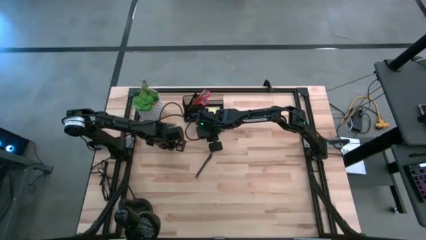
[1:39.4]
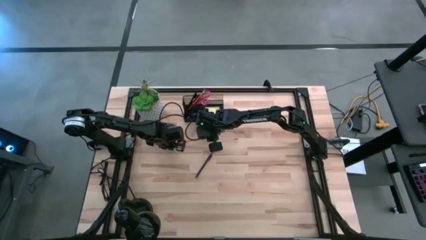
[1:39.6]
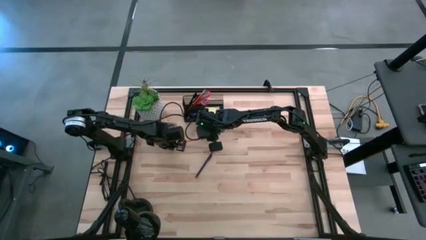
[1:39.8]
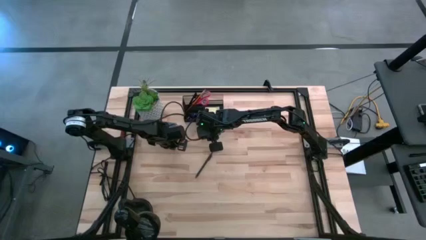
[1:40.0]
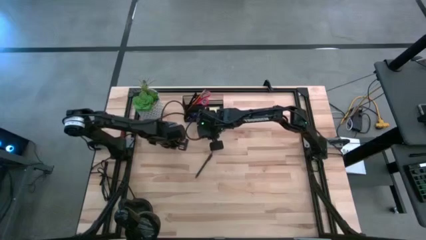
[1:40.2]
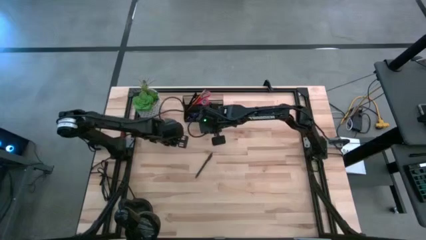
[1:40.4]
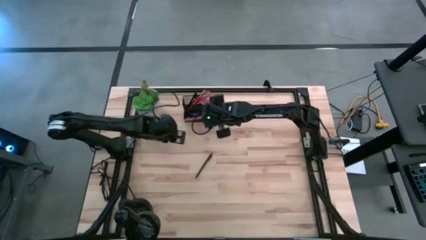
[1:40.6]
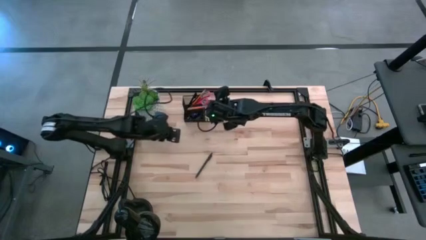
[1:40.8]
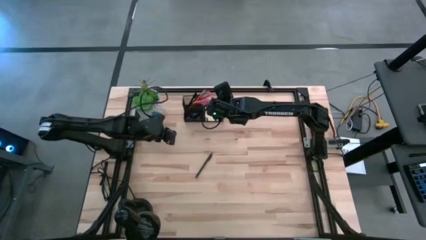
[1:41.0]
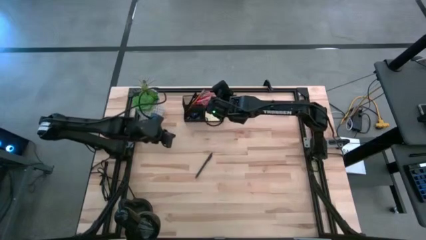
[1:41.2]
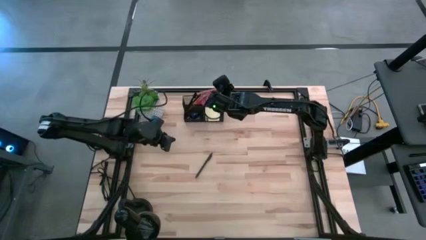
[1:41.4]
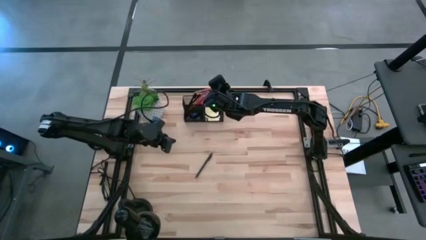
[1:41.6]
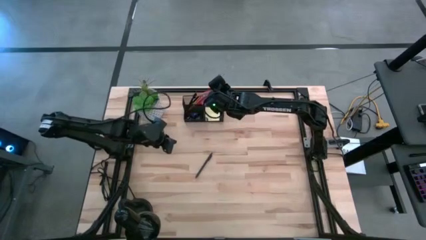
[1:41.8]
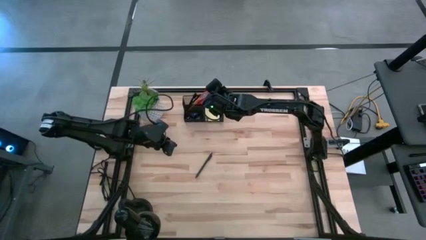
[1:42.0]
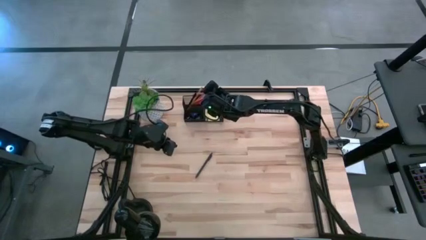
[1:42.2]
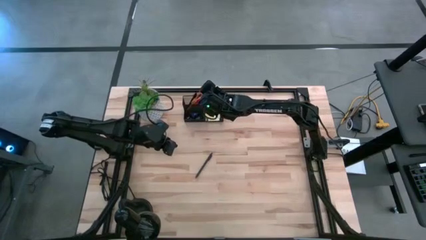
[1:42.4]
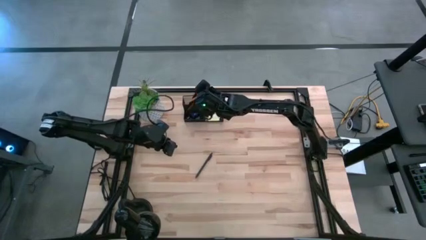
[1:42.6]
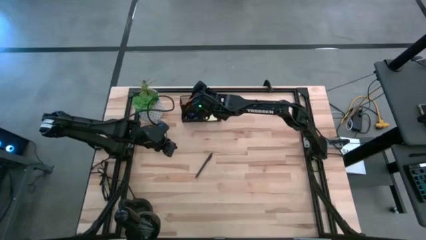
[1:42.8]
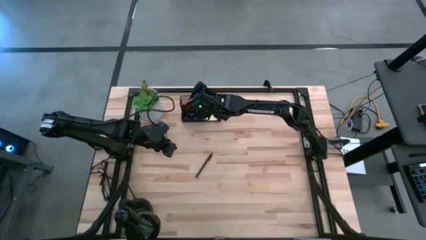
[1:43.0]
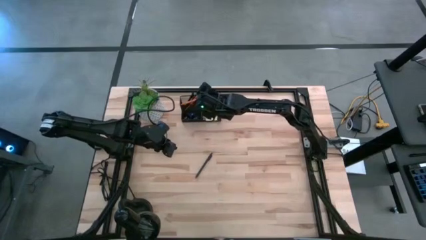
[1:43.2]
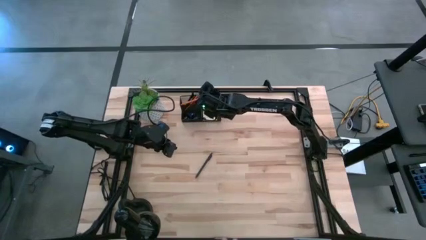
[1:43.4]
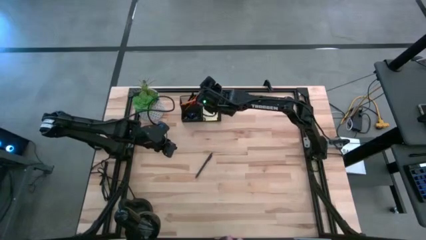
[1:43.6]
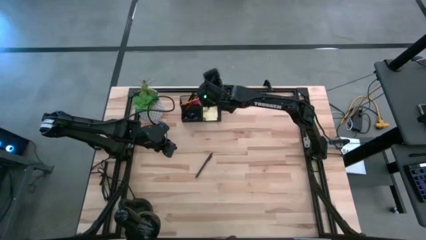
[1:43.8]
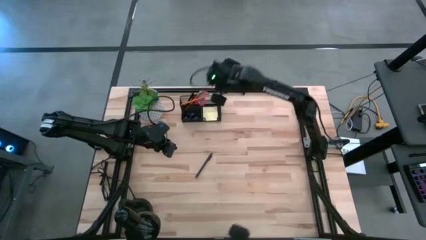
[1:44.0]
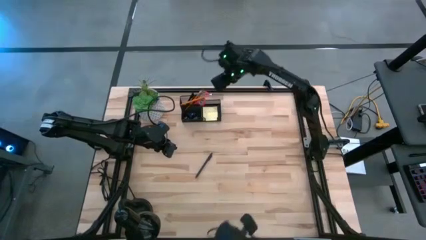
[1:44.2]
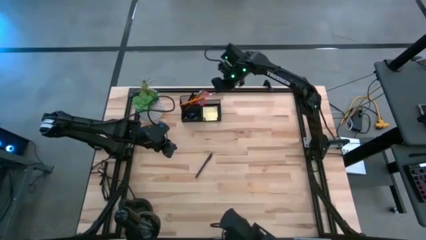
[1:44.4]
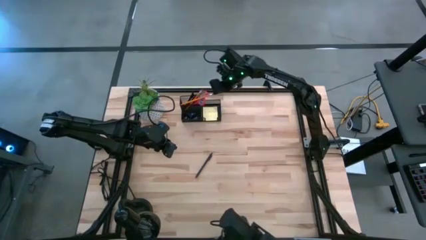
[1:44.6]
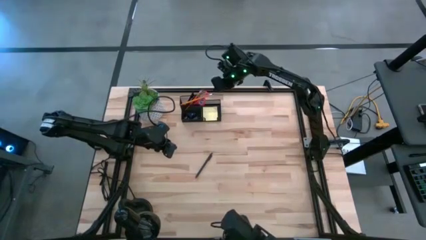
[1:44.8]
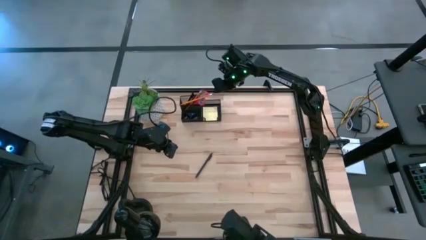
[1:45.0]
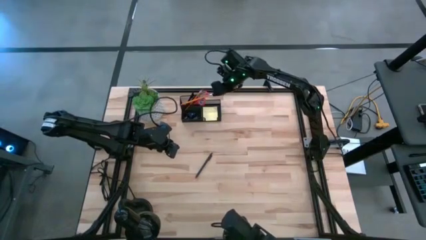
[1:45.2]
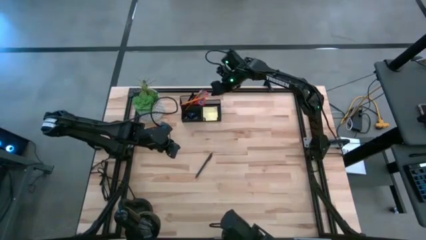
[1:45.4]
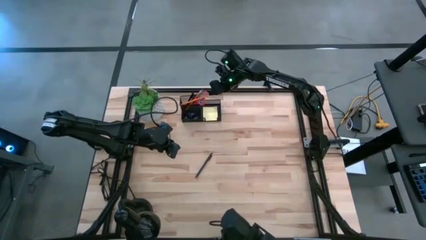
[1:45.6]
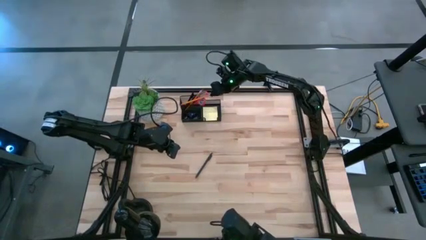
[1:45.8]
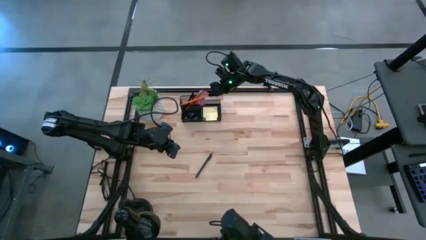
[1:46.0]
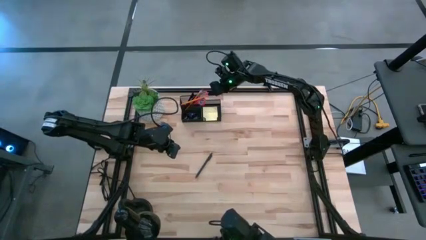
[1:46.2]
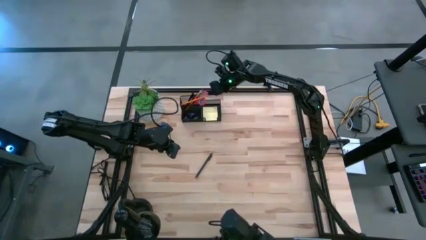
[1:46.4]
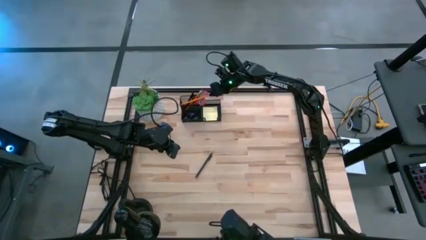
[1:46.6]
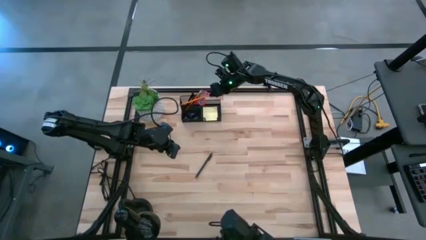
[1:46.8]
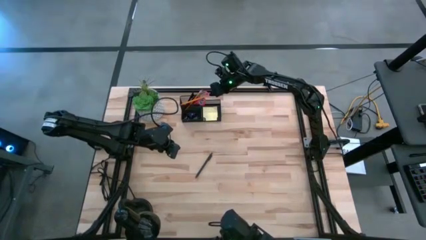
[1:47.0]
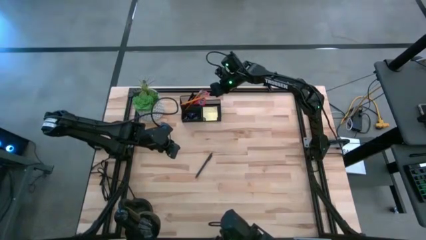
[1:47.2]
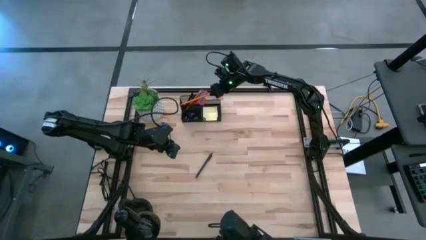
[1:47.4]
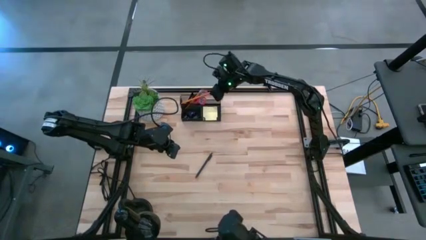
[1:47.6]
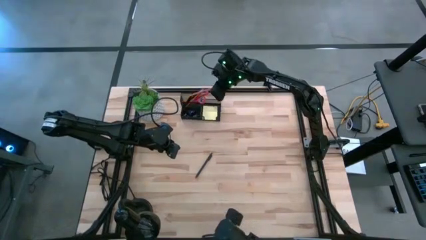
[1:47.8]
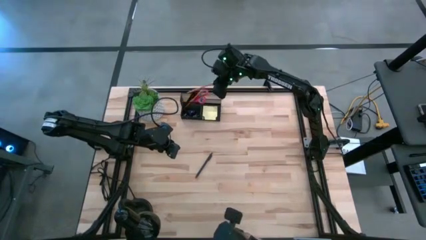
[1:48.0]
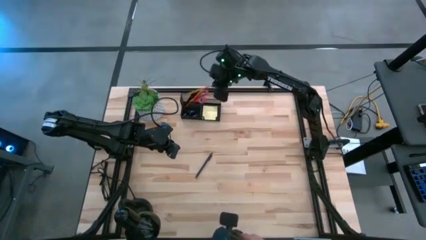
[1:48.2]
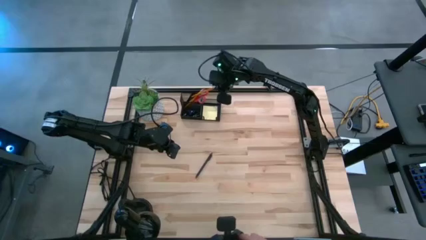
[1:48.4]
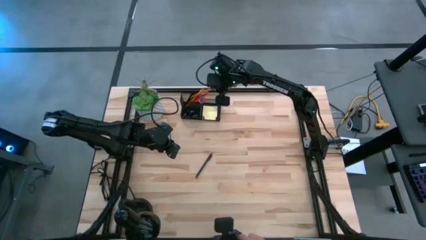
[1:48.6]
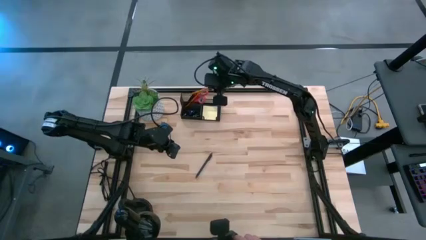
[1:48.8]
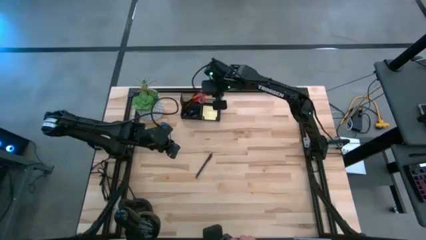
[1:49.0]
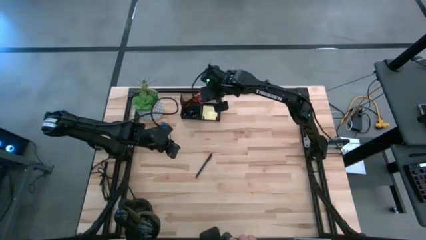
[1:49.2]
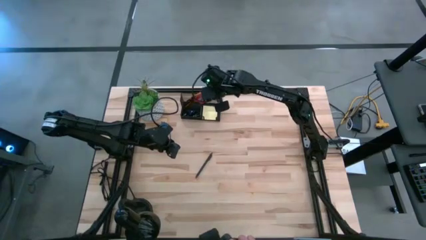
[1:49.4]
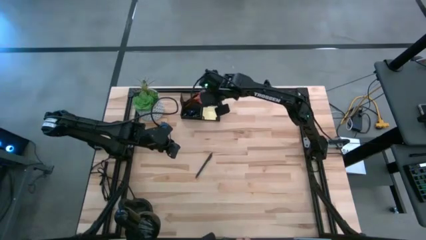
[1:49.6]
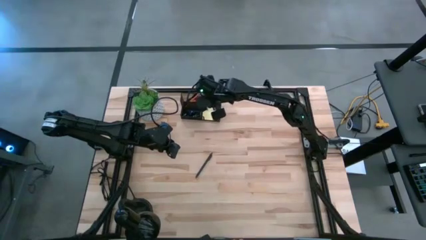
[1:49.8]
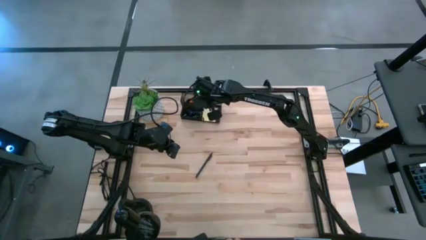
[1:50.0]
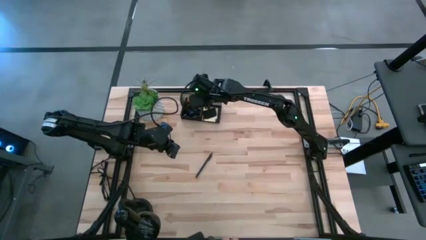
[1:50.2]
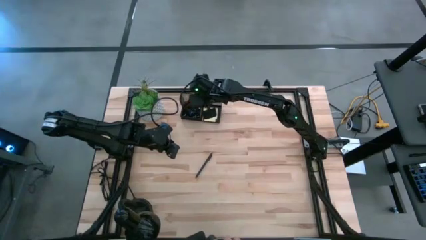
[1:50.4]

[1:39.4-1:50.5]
Task: Pick and place office supplies into organizer
Put the pencil into the top left section of the black desk organizer

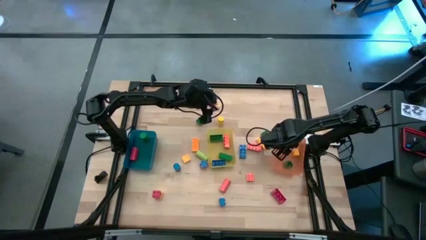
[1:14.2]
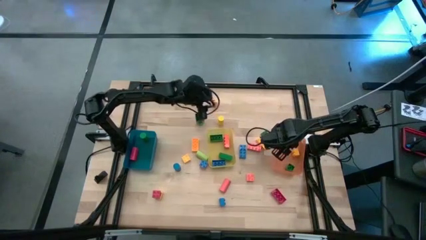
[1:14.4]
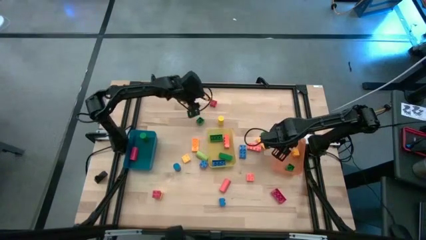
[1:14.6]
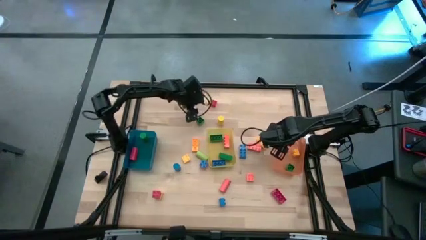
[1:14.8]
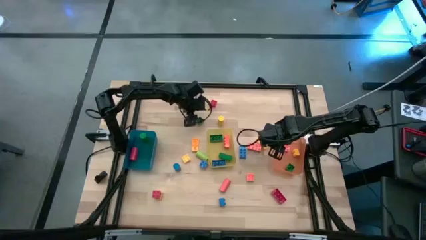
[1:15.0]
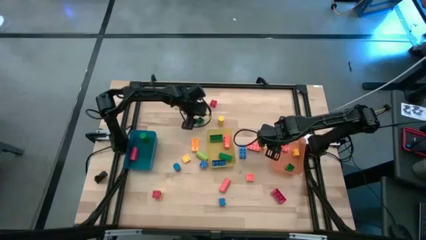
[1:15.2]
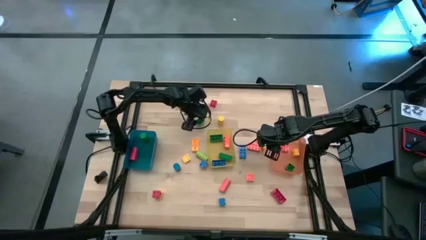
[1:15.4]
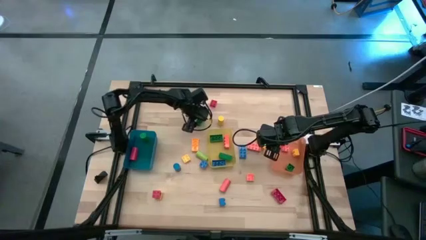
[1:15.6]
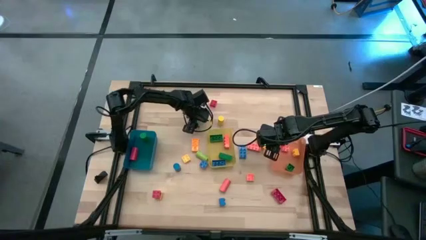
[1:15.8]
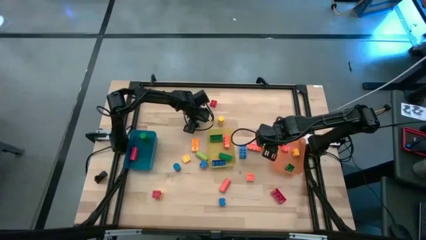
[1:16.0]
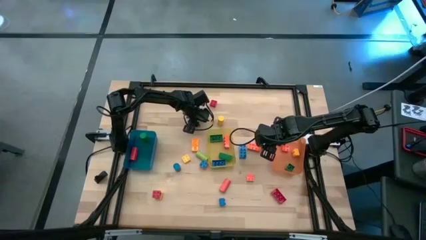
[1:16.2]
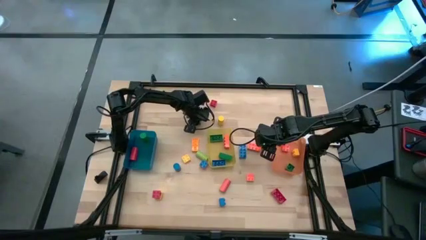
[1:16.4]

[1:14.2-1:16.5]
Task: Sort blocks by size
Put the green 4 stud game piece into the orange bin
